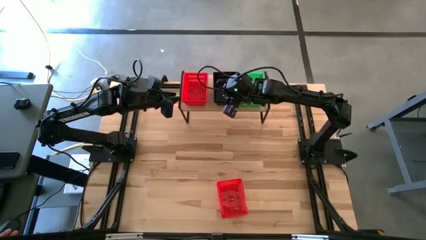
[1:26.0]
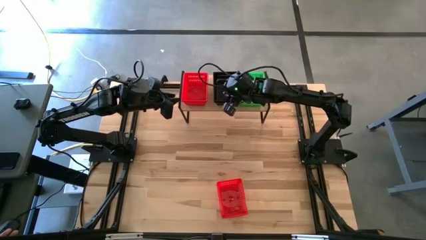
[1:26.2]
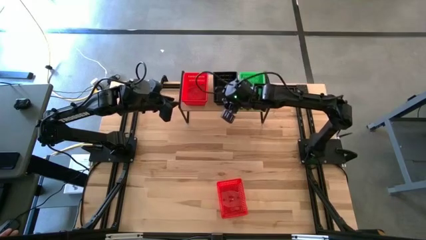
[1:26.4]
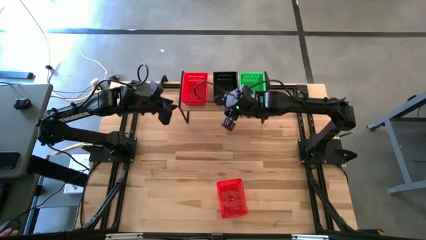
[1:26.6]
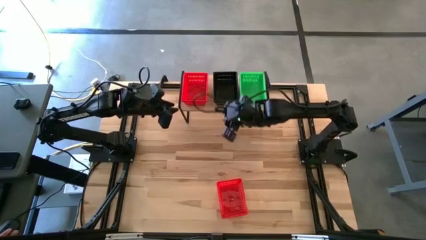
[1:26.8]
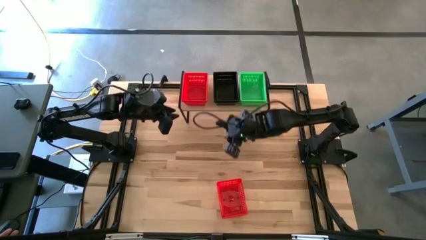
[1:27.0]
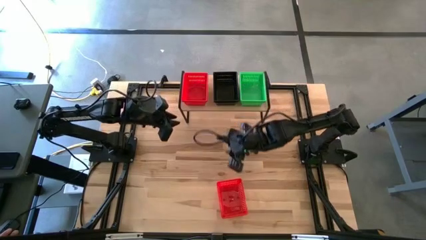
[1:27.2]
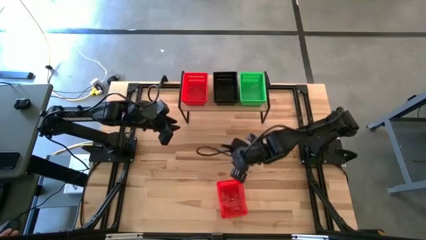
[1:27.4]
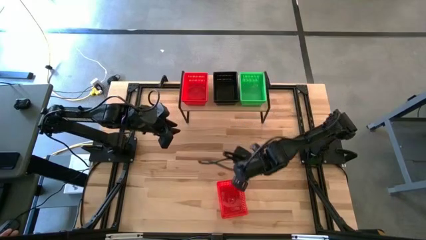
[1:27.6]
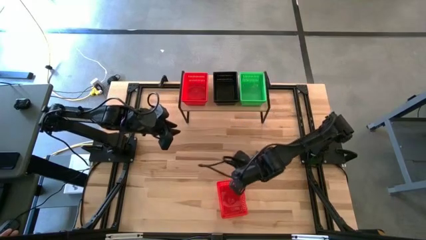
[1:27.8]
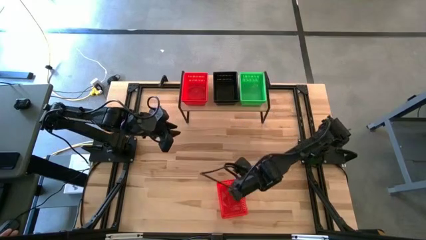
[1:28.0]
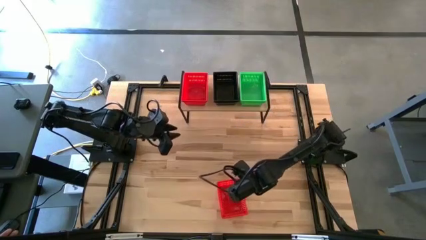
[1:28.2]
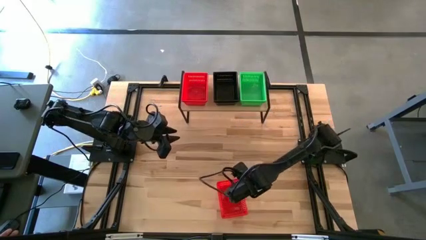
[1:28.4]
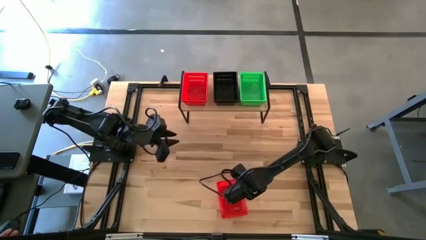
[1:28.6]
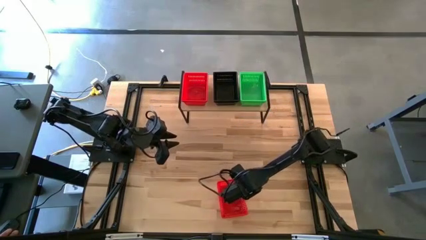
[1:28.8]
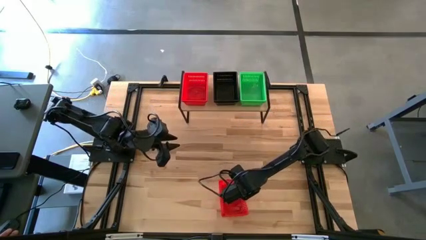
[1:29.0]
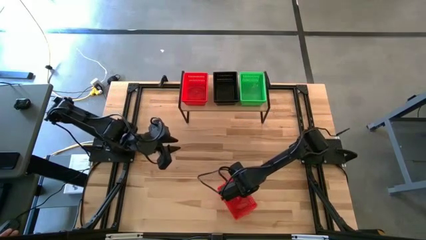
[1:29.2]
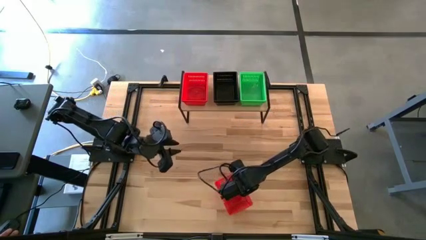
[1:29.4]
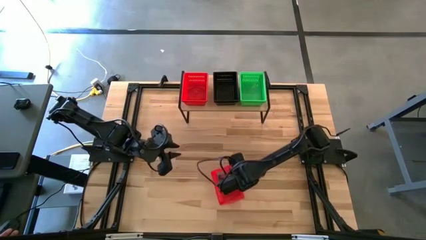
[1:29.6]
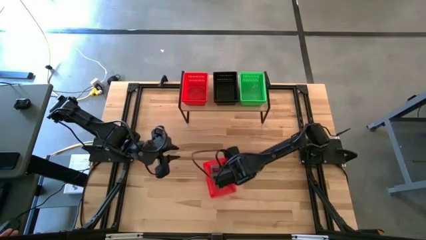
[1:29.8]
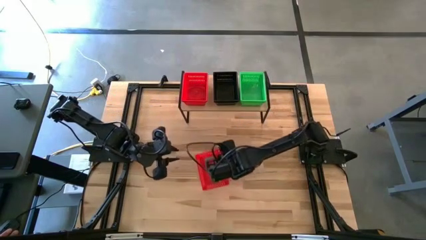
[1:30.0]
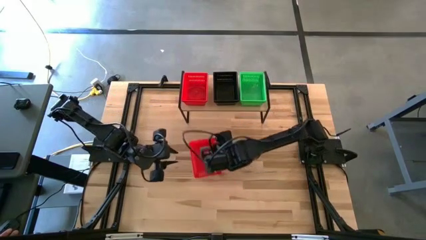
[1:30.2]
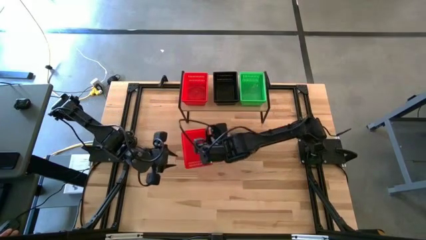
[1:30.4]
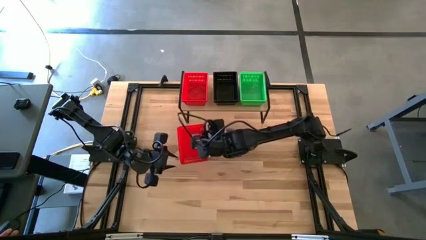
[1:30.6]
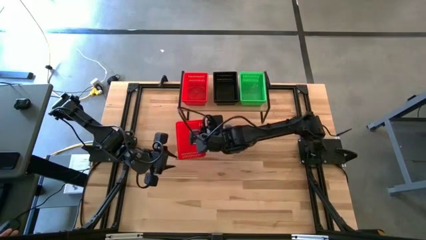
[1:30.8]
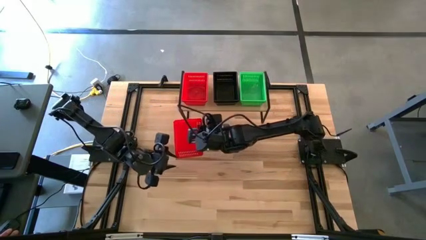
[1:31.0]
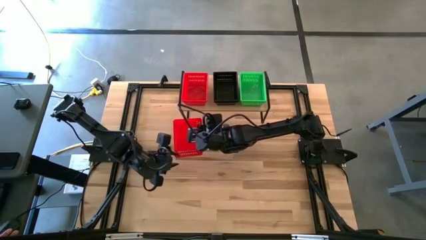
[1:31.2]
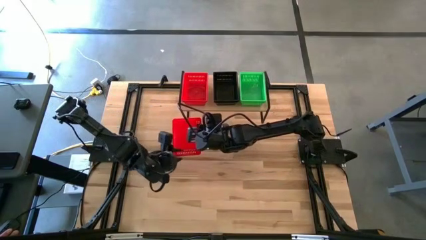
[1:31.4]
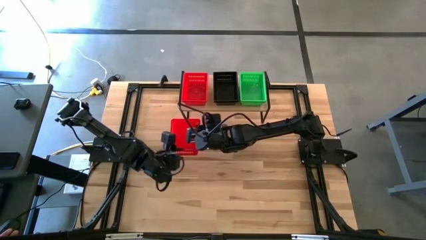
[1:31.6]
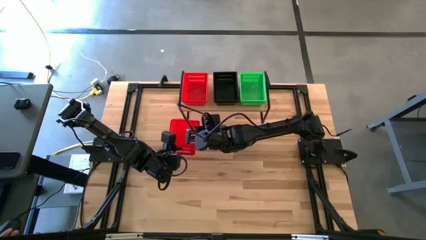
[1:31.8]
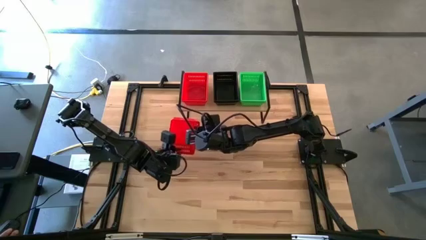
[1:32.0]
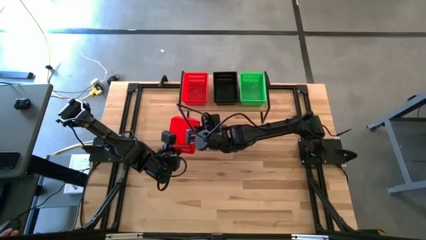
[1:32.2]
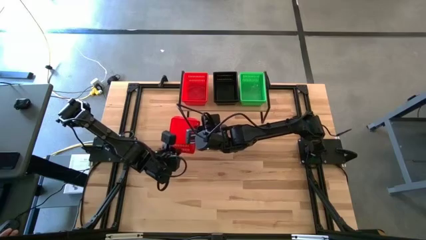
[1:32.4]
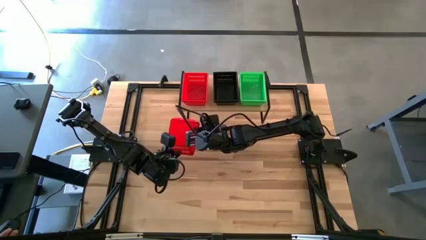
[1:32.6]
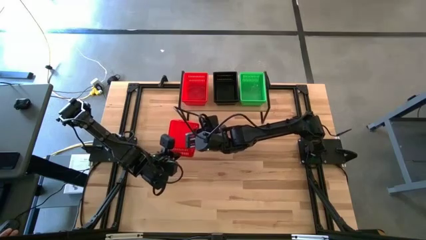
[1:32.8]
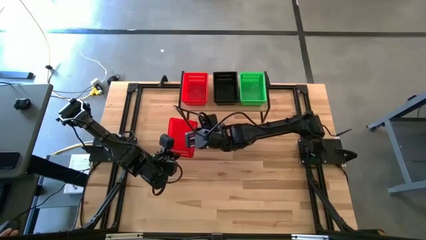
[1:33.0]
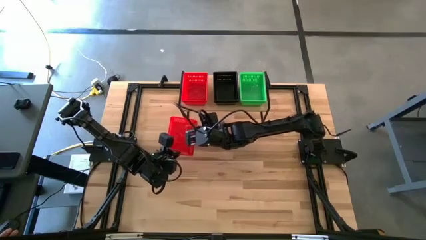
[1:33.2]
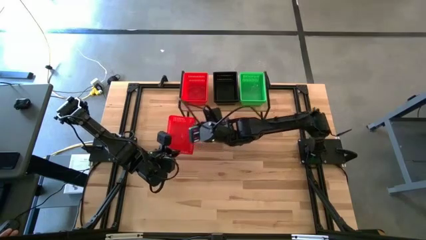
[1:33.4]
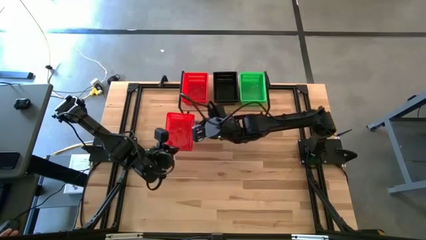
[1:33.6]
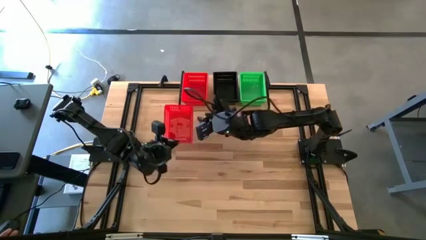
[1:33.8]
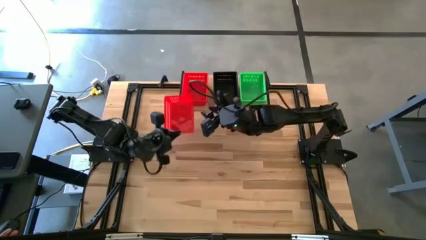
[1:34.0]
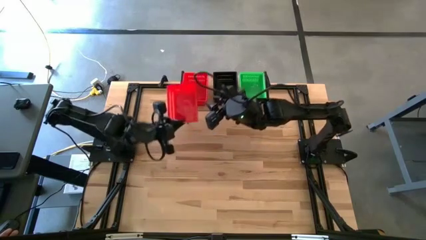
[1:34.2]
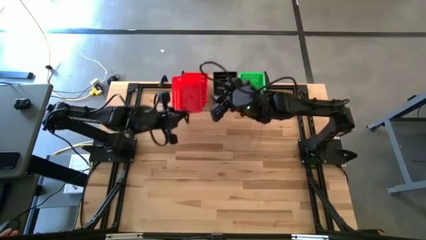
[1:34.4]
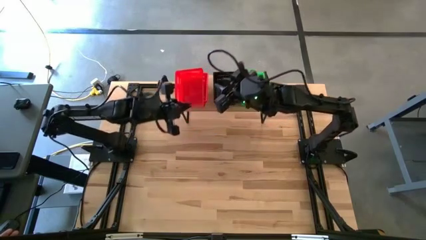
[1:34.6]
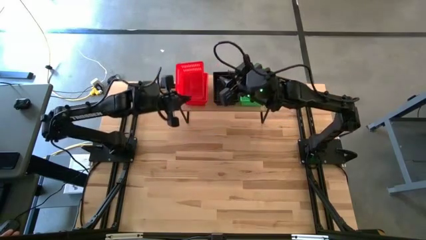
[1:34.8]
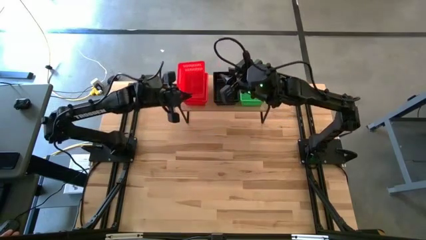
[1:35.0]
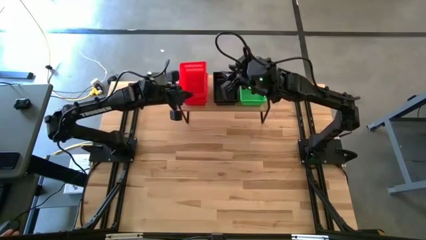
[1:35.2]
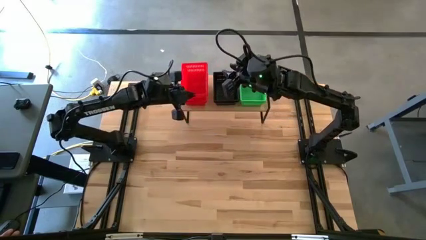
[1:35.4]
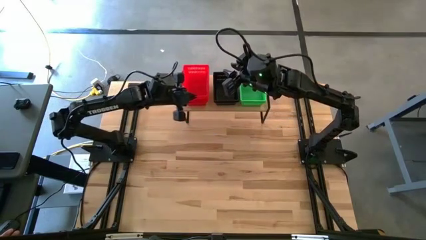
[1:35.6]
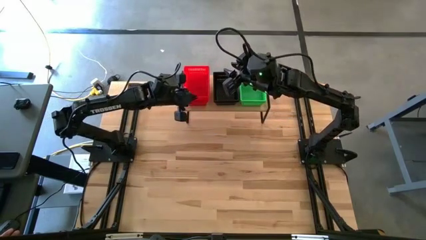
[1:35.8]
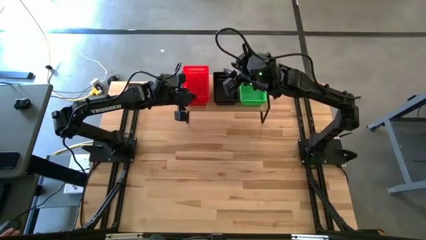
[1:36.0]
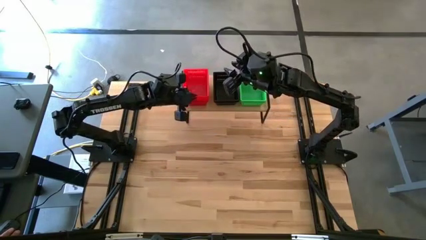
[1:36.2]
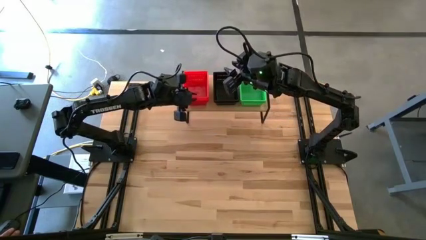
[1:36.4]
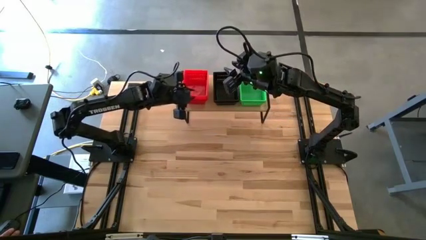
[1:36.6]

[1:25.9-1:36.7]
Task: Stack baskets on shelf by color
Stack the red bin on the stacked red bins on the shelf

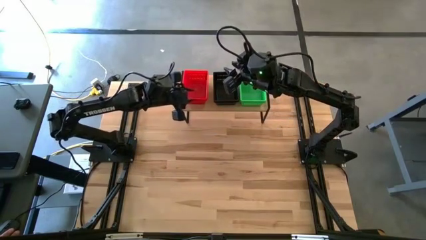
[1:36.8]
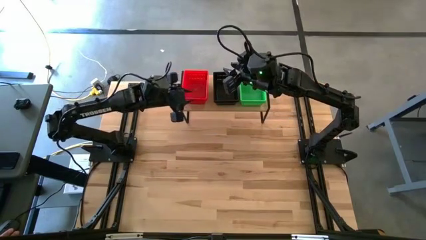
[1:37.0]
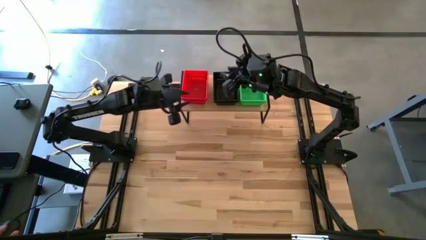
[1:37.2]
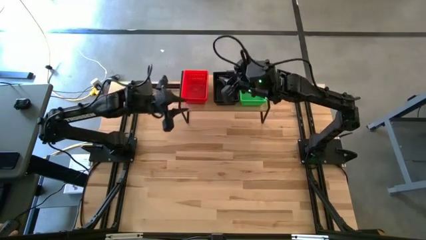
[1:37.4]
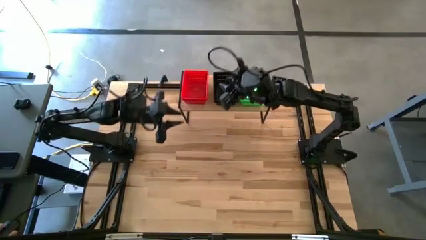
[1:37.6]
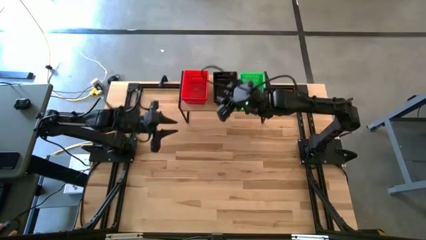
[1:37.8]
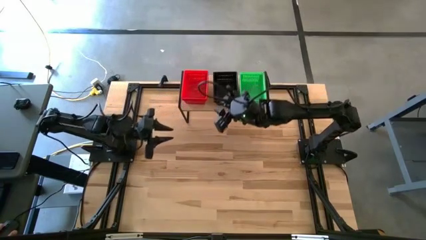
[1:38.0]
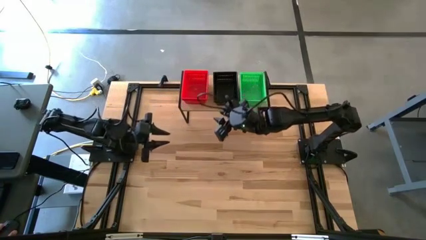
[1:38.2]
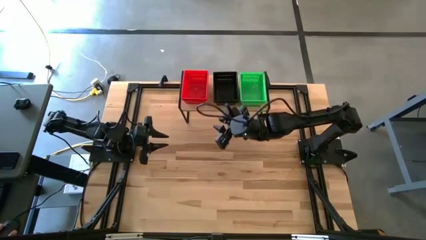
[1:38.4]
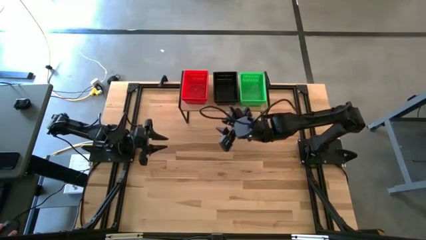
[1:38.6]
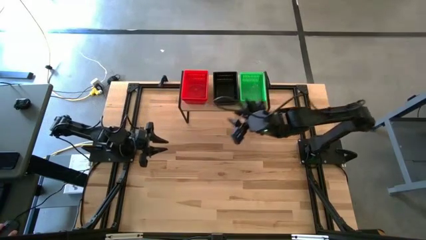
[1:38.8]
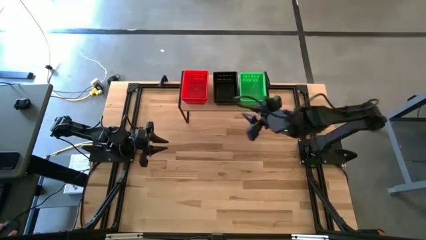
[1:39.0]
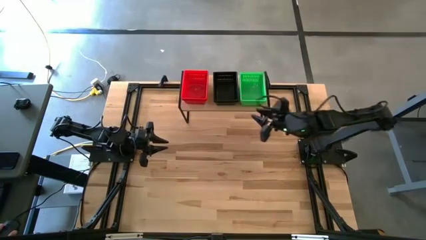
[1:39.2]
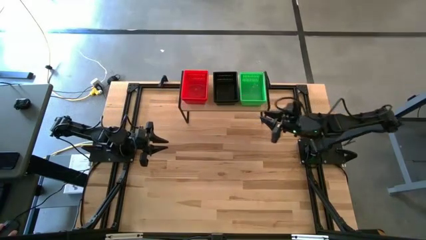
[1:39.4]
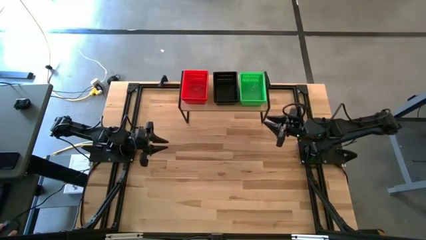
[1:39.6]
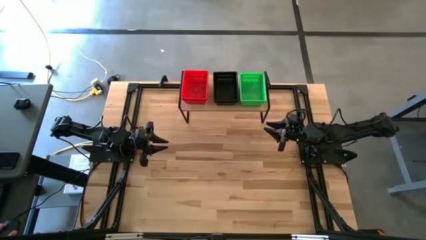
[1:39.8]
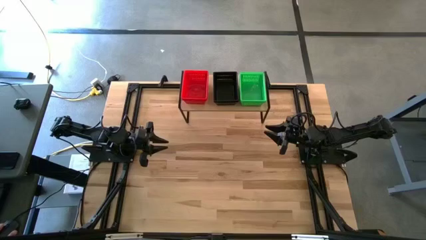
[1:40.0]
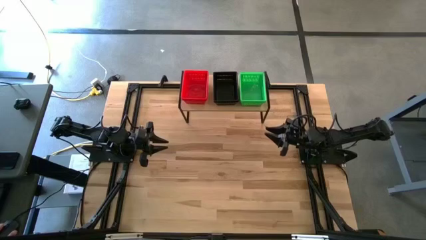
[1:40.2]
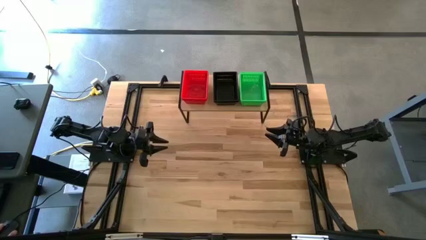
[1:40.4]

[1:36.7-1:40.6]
Return to Home Position
